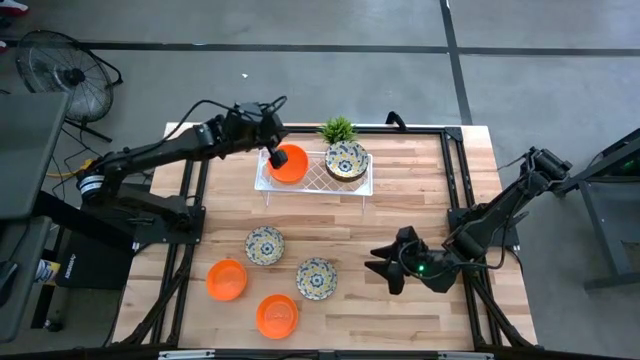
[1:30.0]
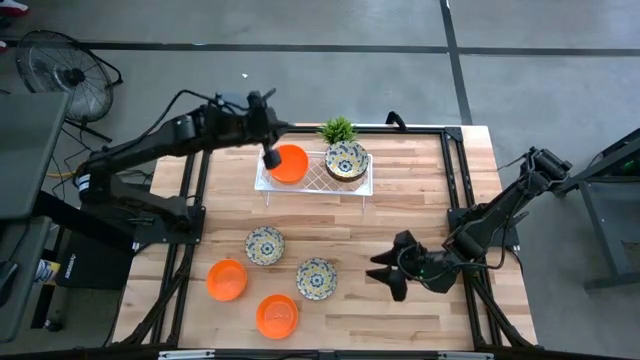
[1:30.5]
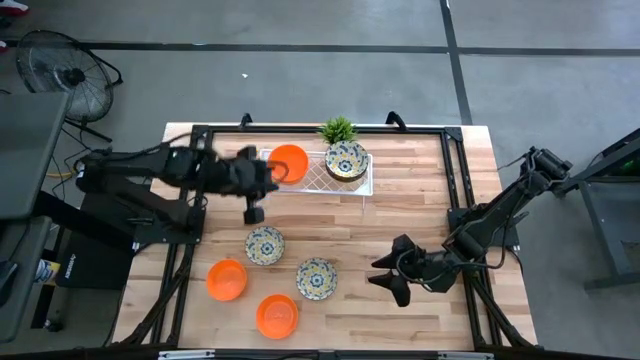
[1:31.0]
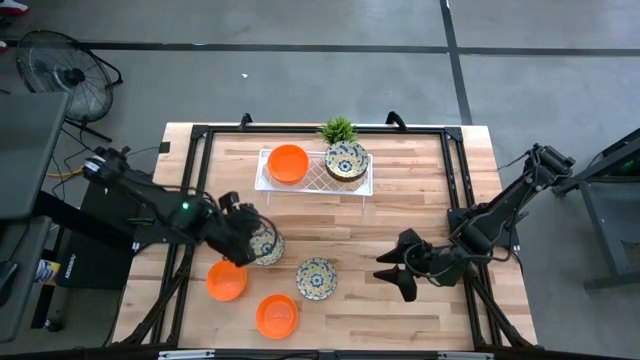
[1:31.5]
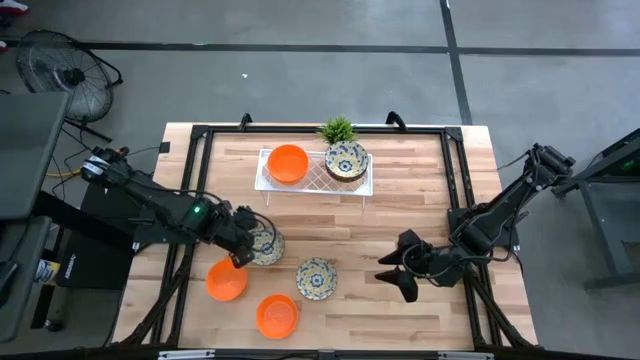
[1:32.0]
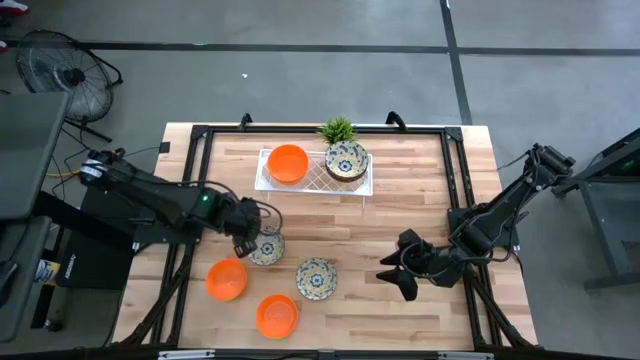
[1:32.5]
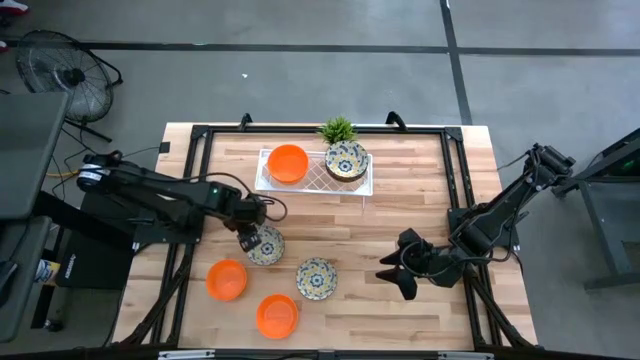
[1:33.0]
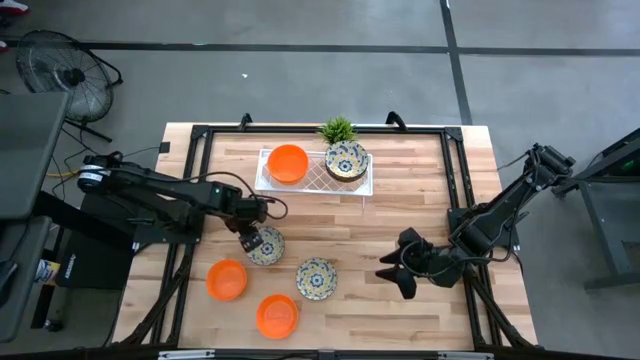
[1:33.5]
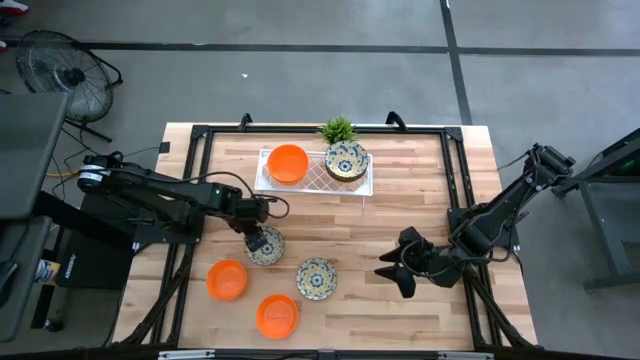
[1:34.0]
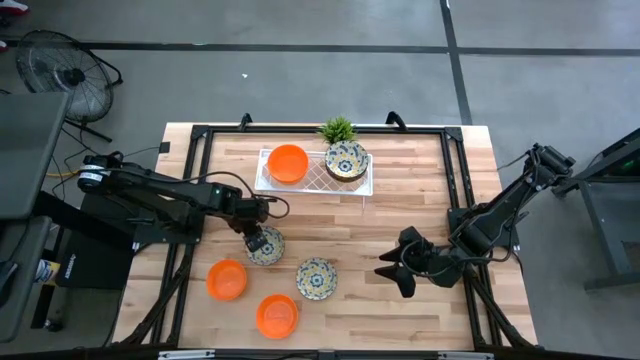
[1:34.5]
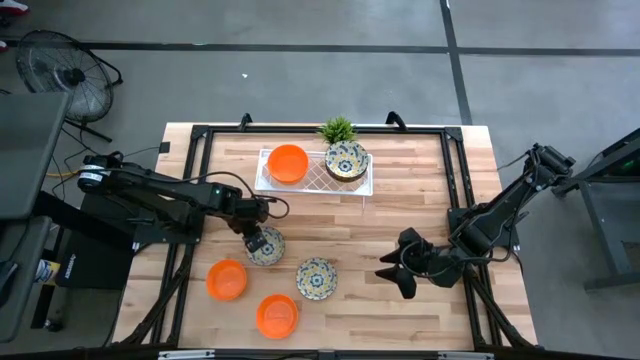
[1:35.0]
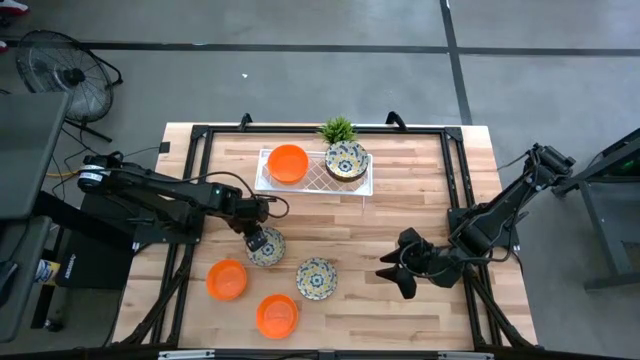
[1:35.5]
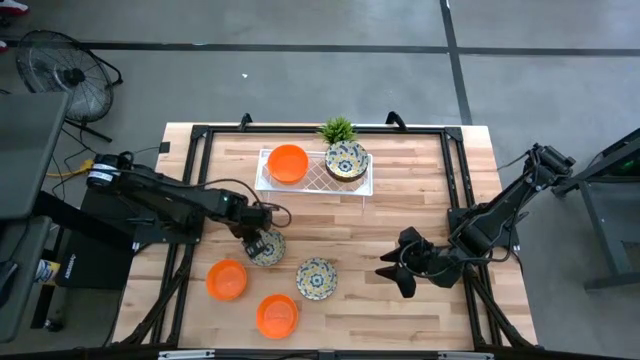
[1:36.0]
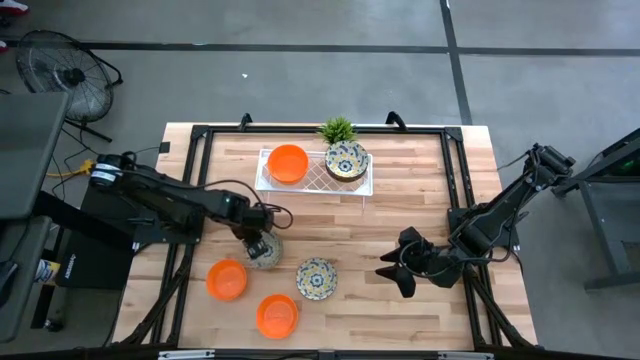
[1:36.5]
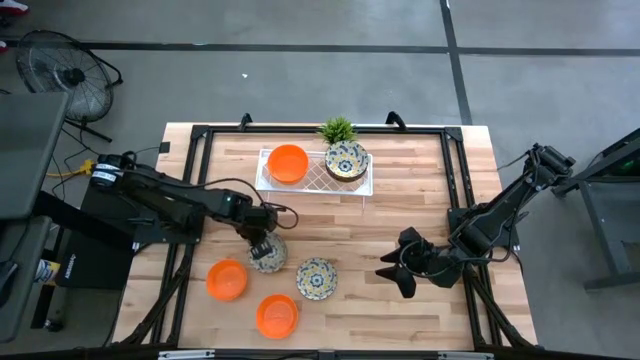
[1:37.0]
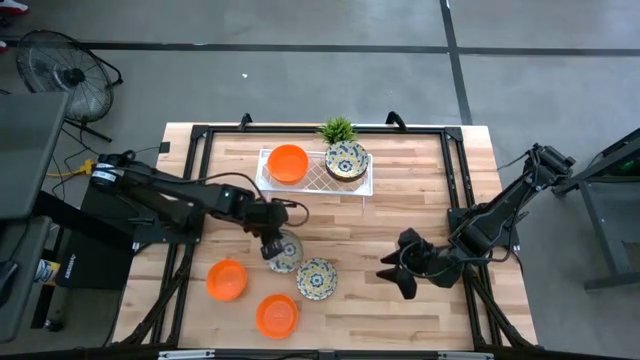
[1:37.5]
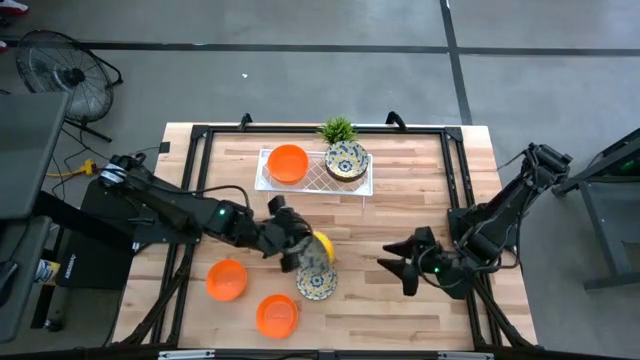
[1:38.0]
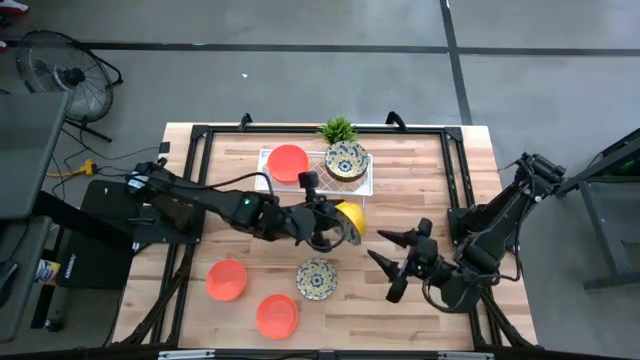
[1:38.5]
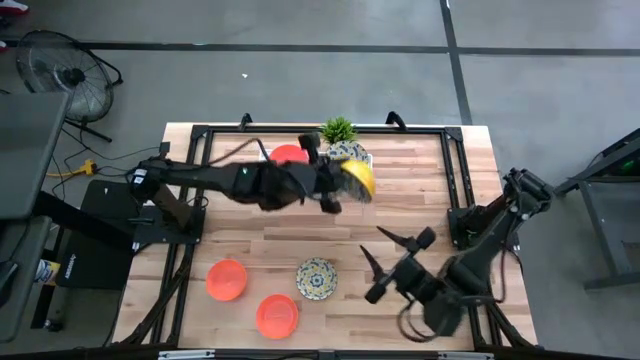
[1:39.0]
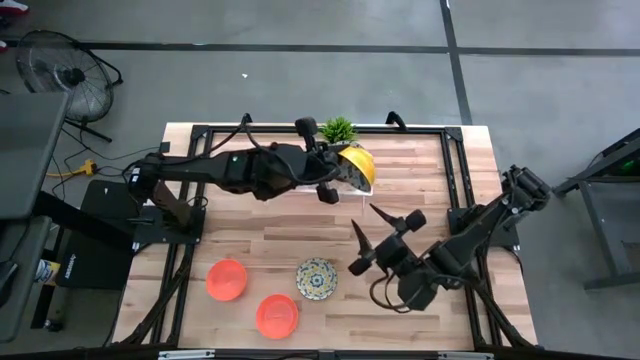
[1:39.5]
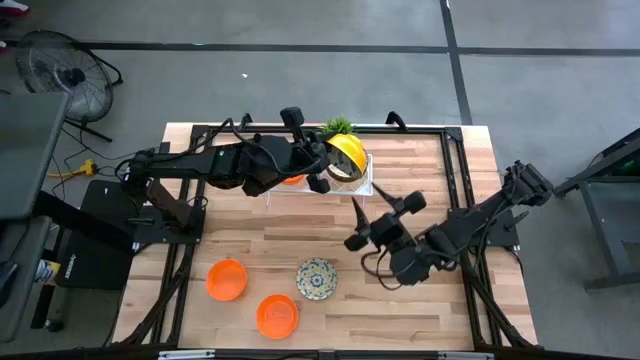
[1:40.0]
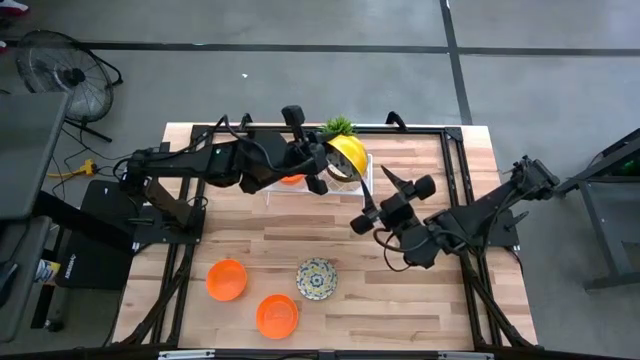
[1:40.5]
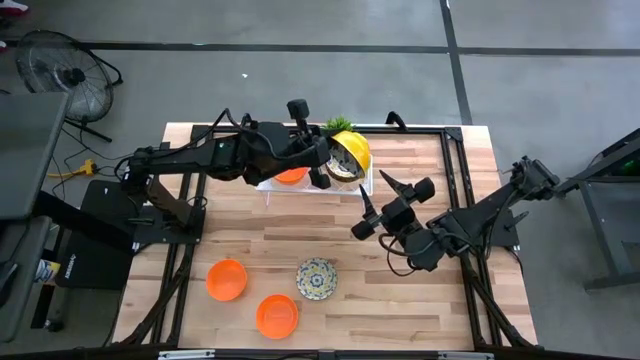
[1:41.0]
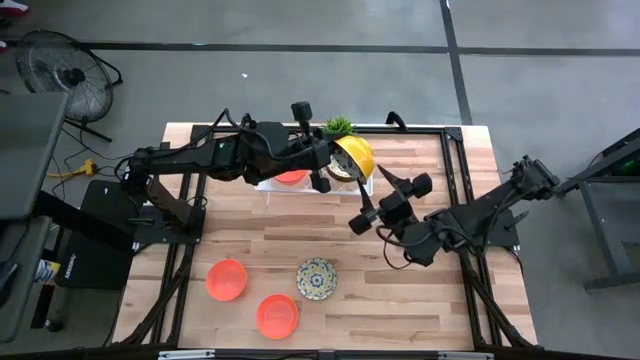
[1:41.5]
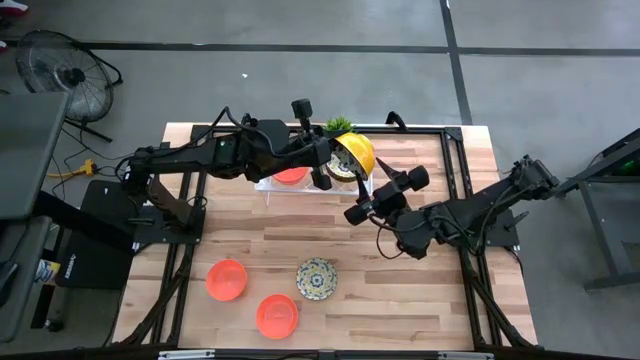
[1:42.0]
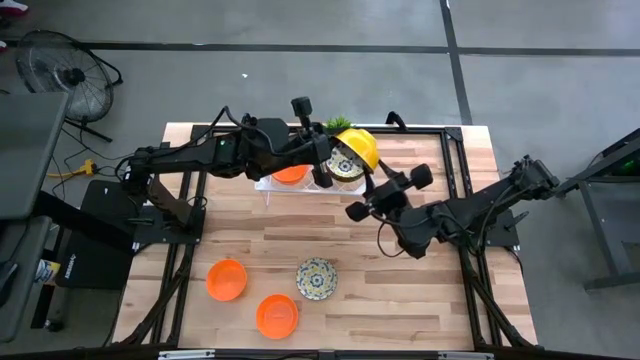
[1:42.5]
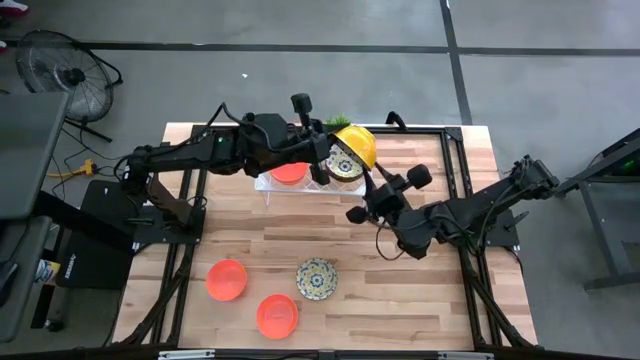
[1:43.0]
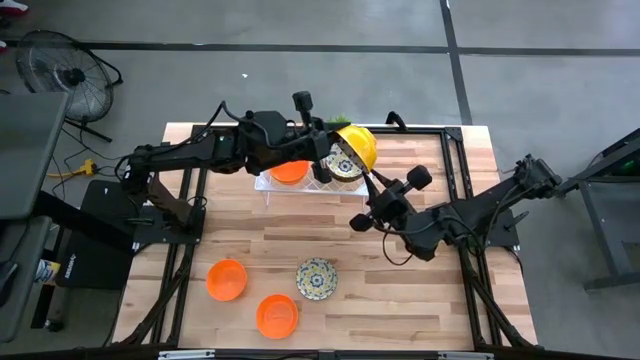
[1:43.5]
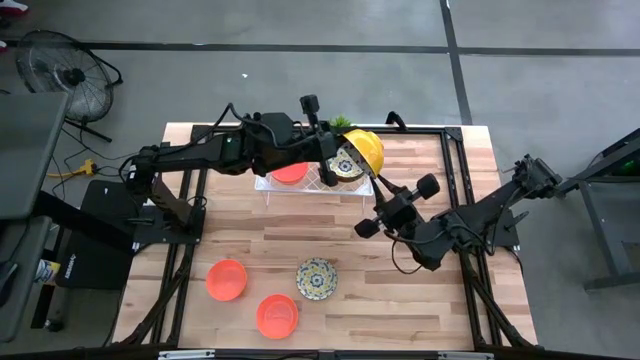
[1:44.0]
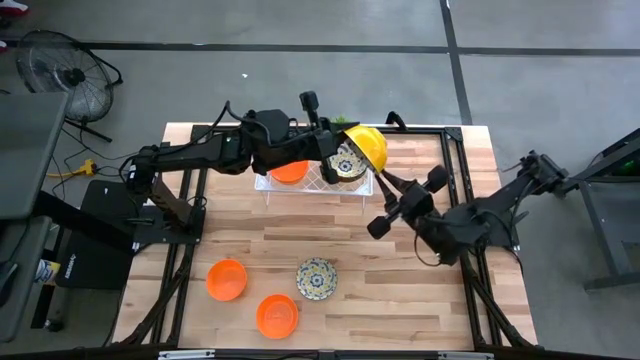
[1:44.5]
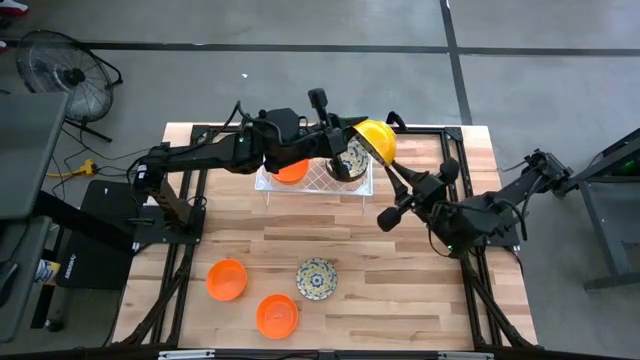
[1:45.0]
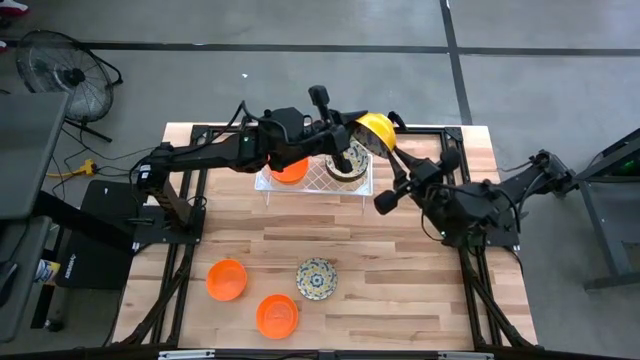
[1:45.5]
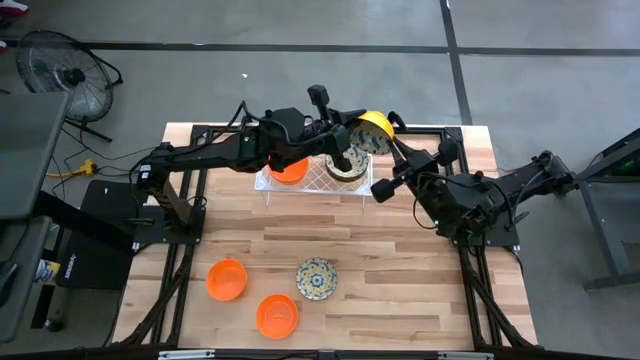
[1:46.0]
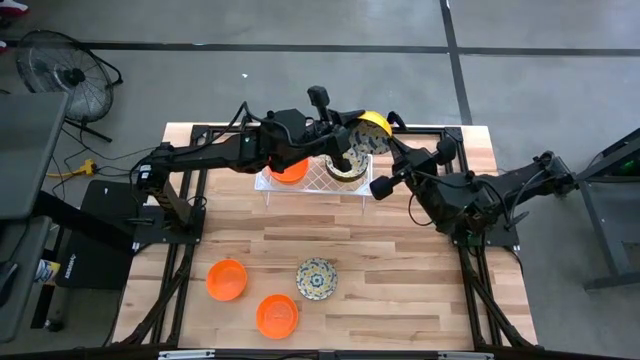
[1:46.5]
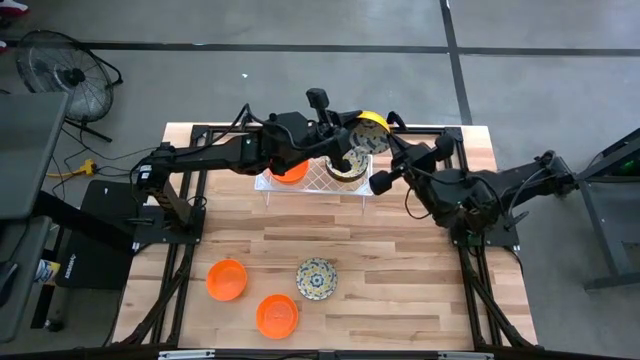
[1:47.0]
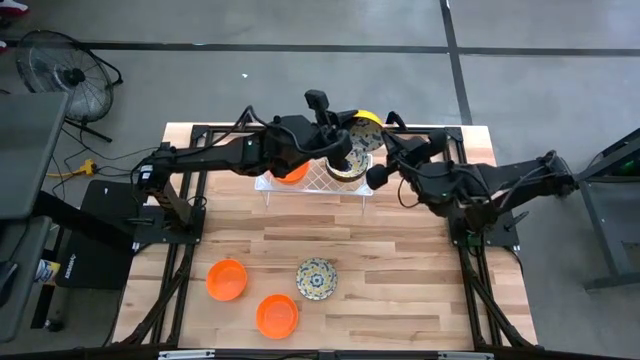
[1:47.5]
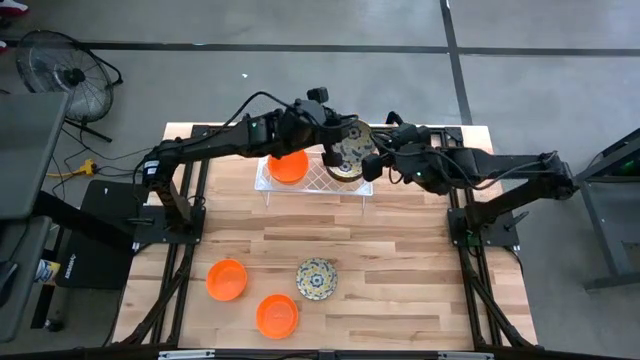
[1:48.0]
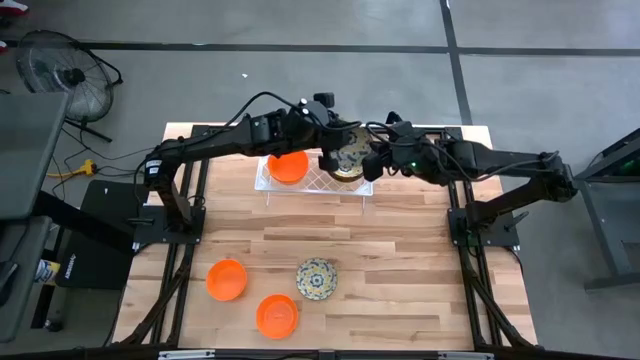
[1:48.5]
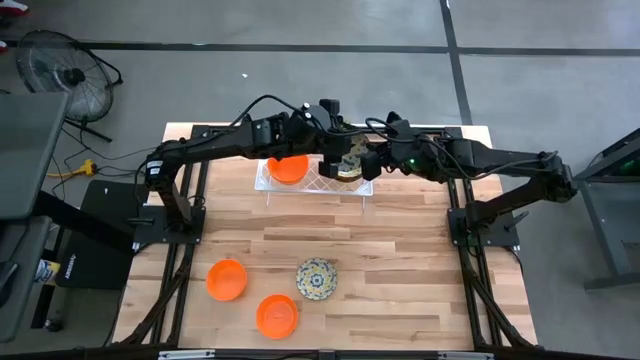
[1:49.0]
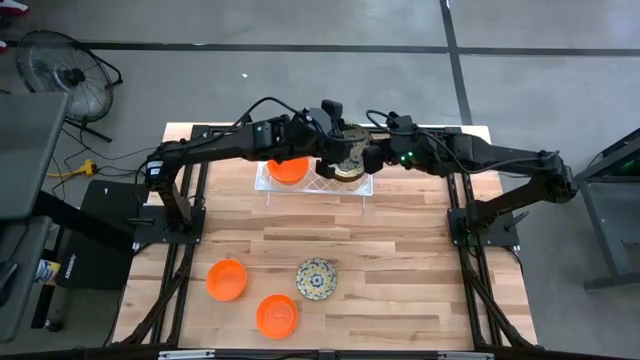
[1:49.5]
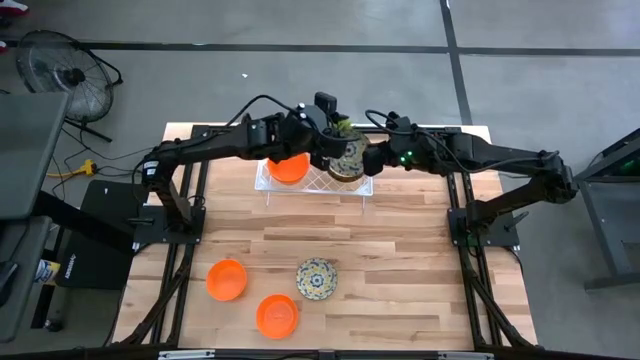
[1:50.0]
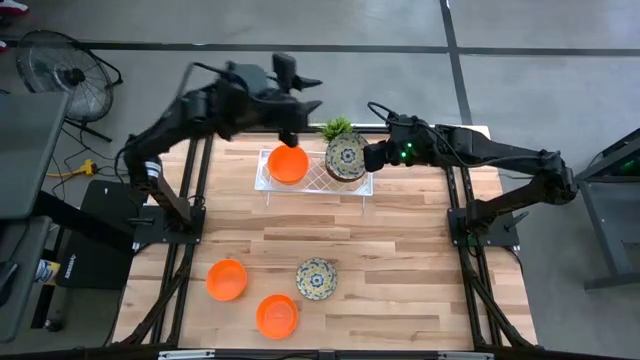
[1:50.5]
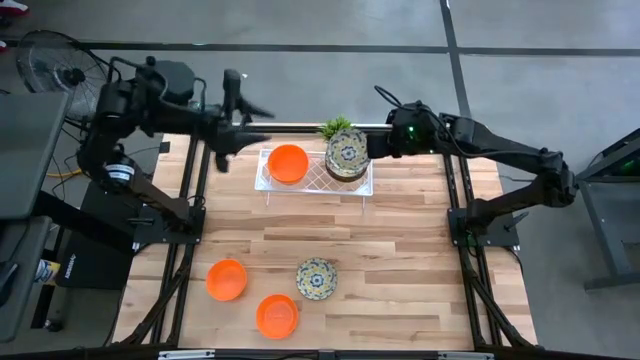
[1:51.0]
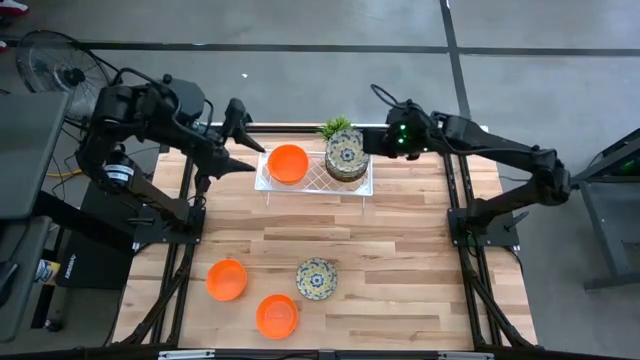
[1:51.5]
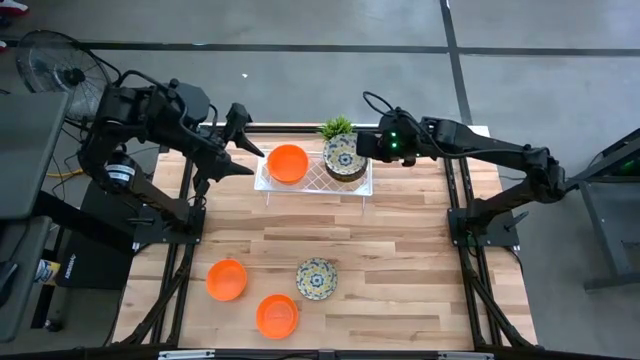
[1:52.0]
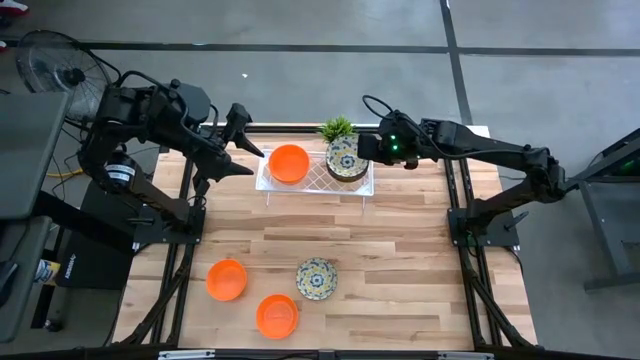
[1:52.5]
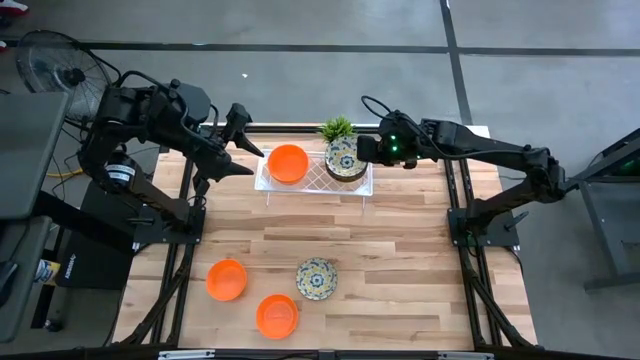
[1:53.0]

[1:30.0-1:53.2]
Task: Pick & Place Mini bowls
Stack the yellow bowl on the yellow bowl on the shelf
